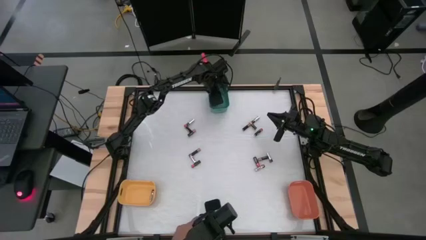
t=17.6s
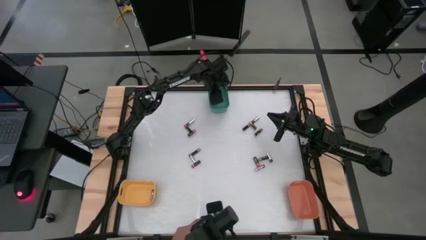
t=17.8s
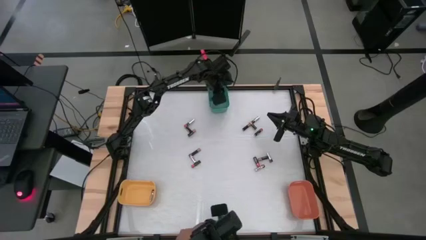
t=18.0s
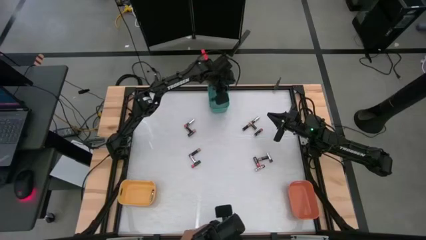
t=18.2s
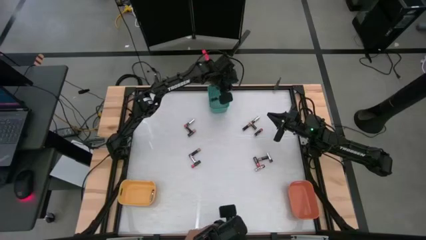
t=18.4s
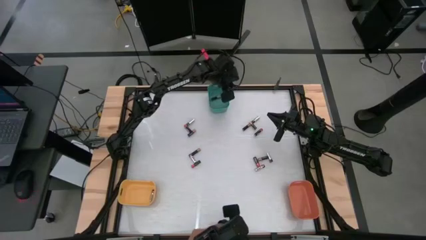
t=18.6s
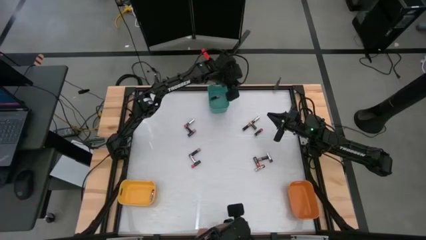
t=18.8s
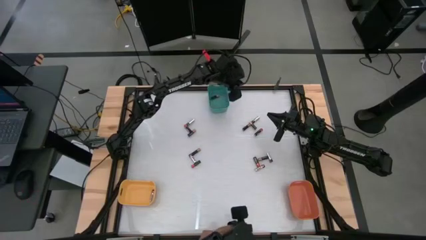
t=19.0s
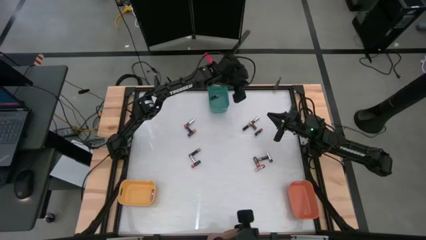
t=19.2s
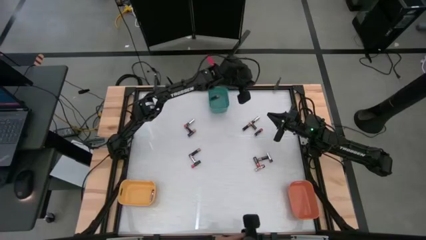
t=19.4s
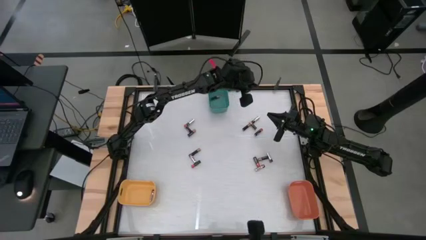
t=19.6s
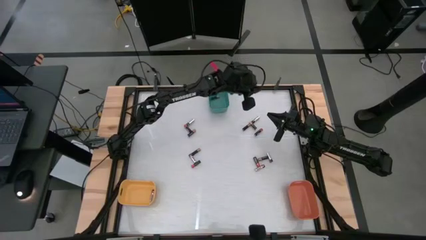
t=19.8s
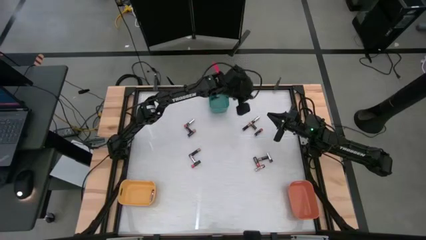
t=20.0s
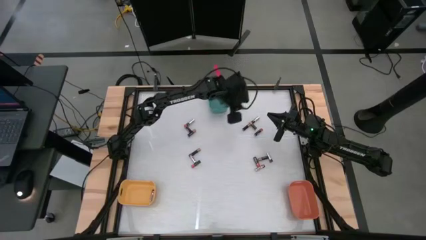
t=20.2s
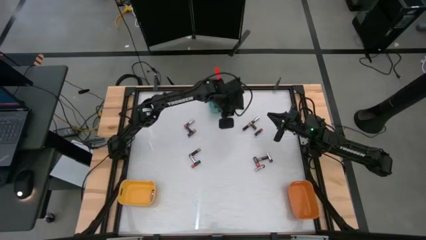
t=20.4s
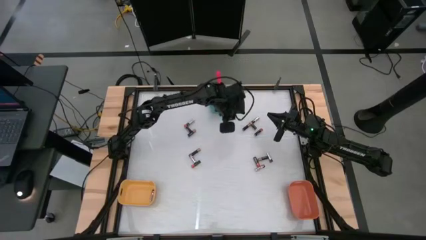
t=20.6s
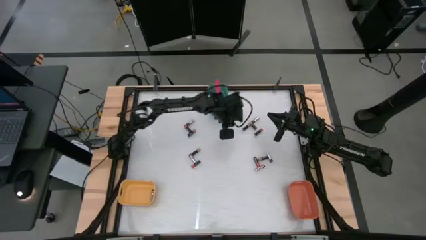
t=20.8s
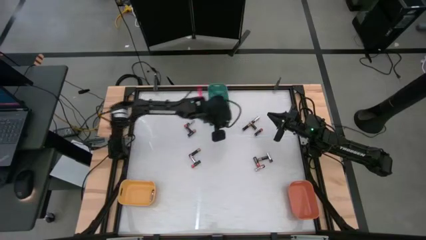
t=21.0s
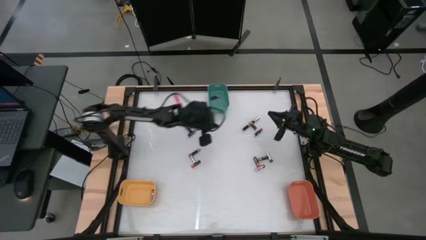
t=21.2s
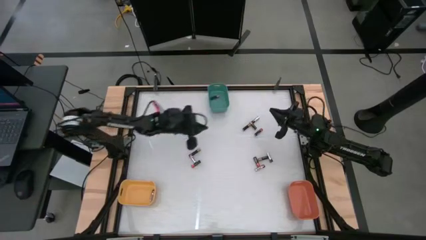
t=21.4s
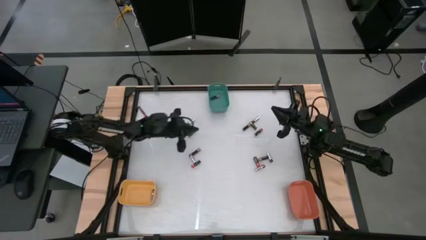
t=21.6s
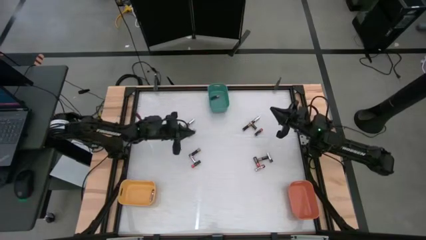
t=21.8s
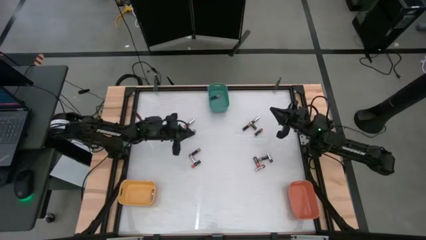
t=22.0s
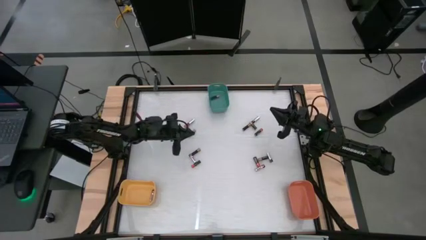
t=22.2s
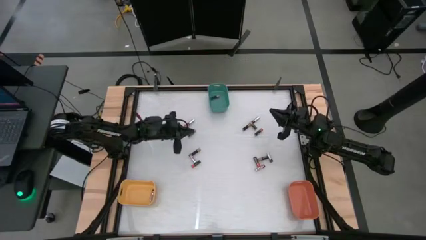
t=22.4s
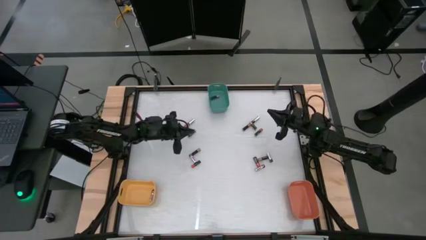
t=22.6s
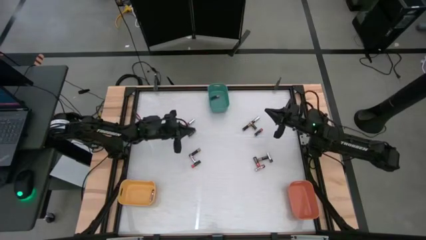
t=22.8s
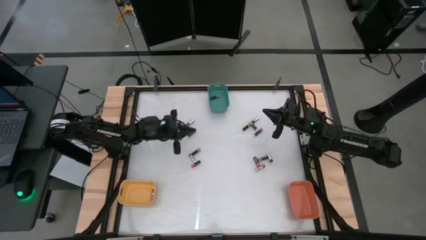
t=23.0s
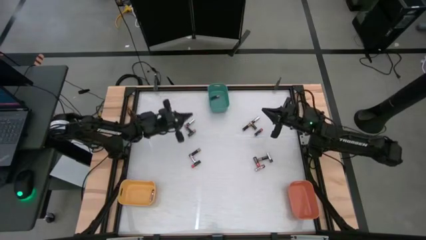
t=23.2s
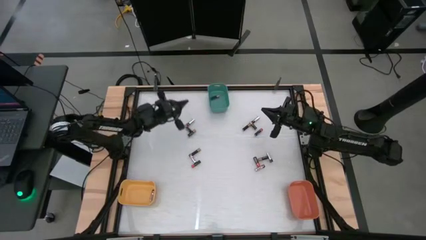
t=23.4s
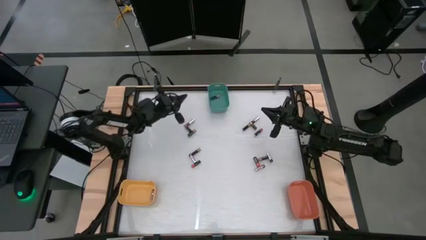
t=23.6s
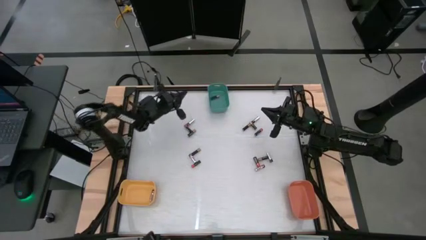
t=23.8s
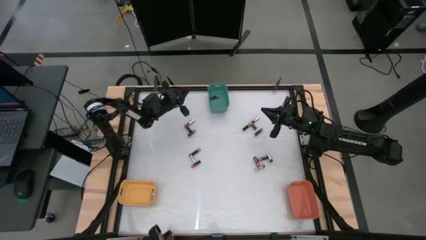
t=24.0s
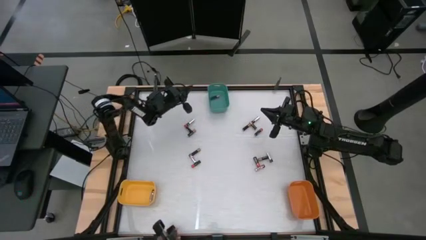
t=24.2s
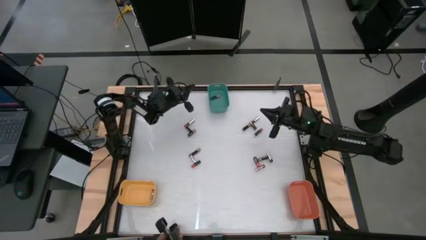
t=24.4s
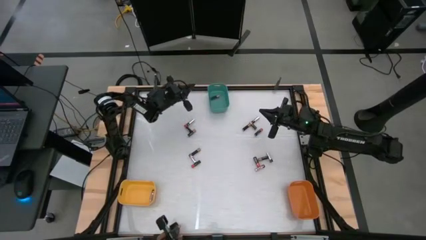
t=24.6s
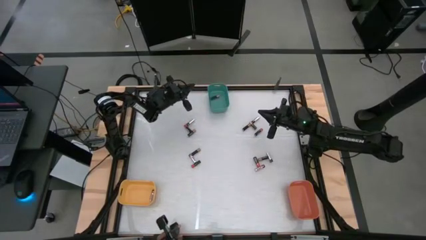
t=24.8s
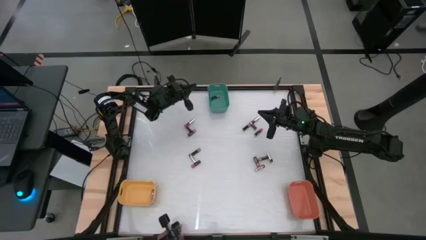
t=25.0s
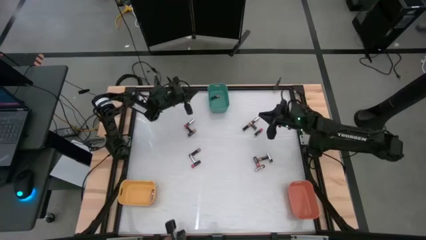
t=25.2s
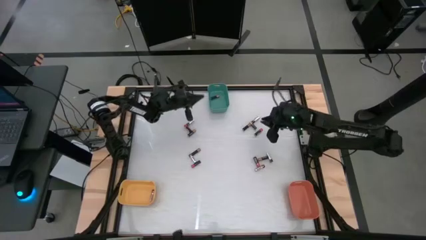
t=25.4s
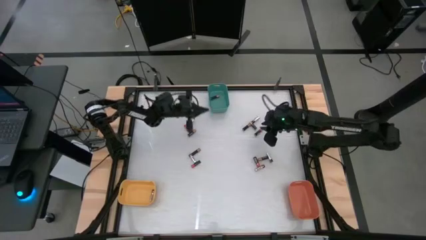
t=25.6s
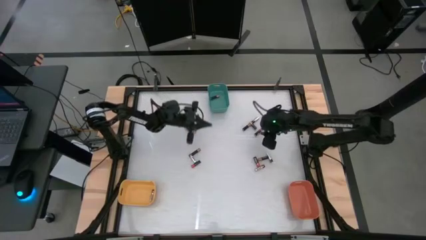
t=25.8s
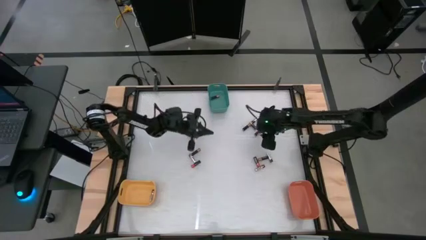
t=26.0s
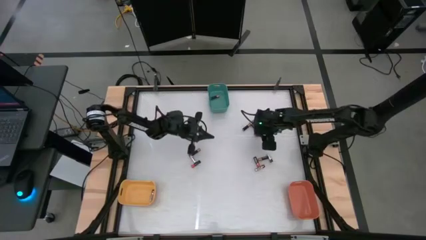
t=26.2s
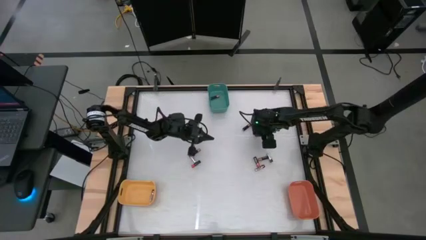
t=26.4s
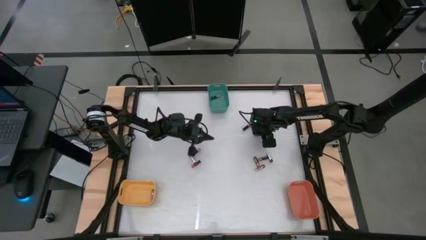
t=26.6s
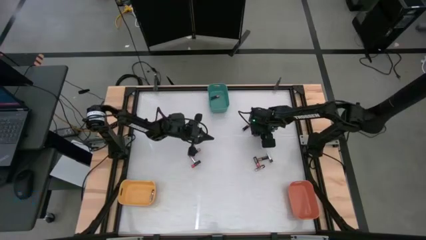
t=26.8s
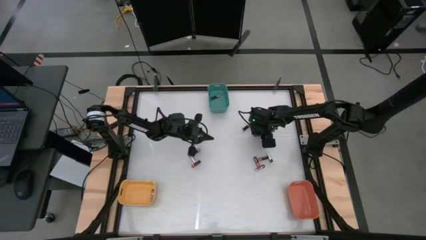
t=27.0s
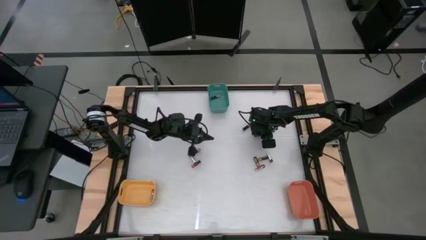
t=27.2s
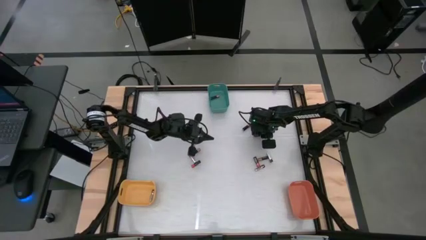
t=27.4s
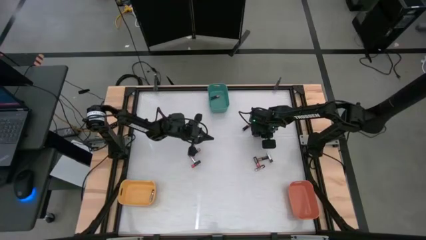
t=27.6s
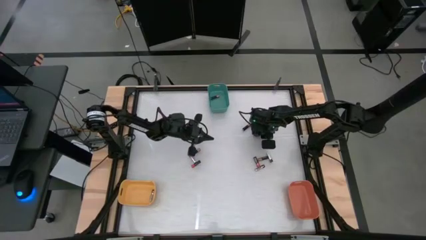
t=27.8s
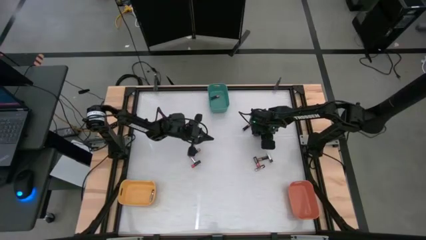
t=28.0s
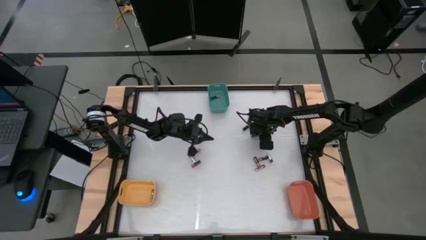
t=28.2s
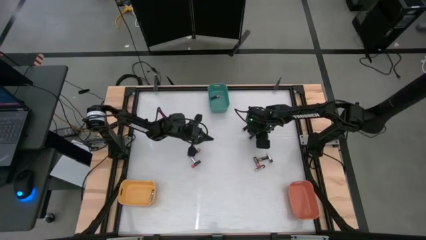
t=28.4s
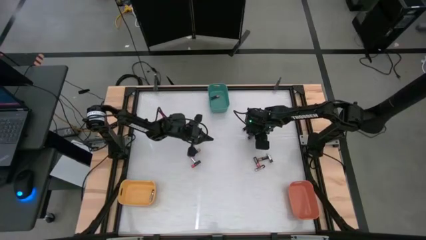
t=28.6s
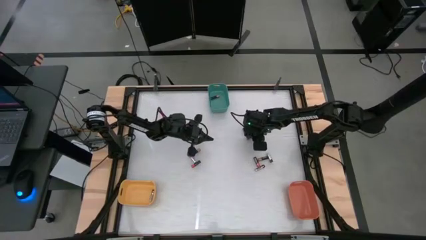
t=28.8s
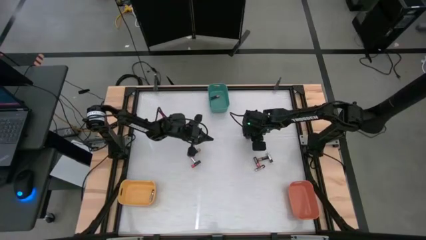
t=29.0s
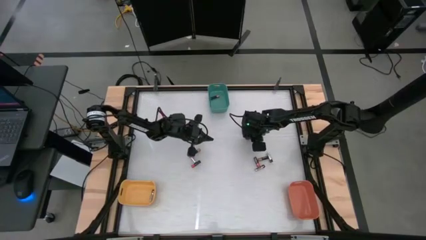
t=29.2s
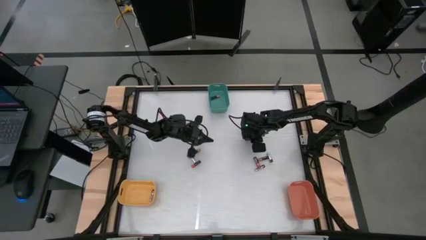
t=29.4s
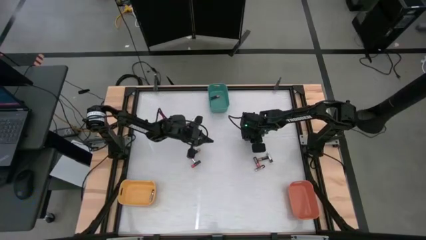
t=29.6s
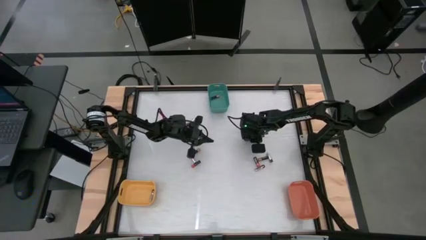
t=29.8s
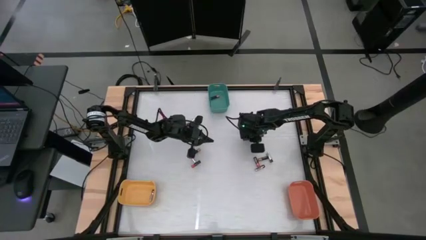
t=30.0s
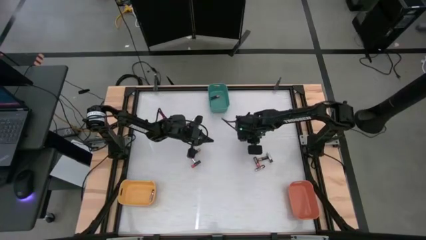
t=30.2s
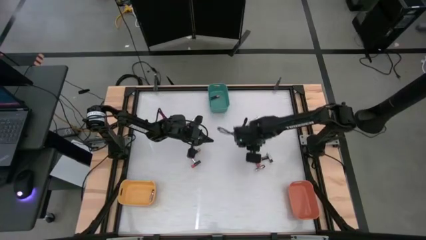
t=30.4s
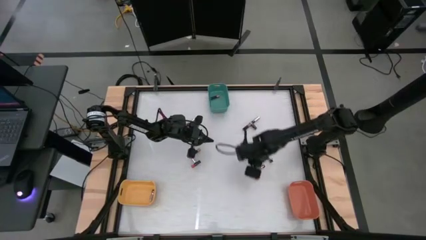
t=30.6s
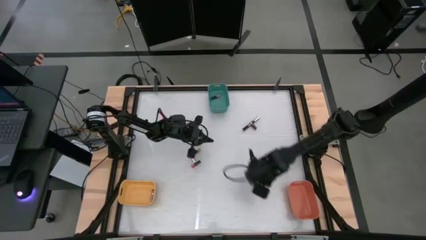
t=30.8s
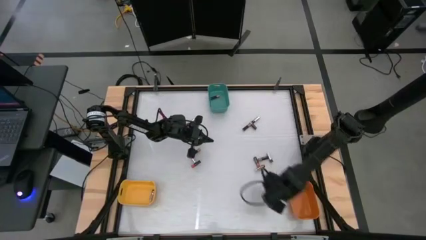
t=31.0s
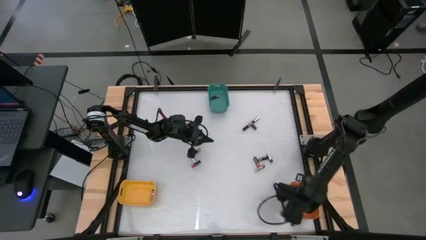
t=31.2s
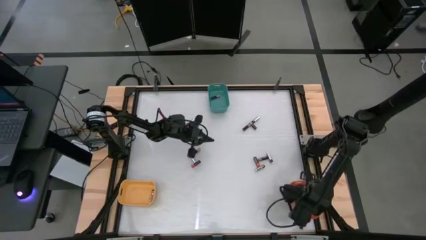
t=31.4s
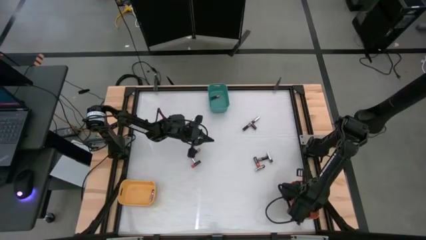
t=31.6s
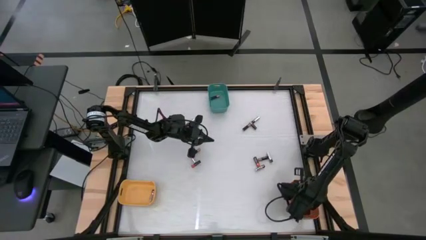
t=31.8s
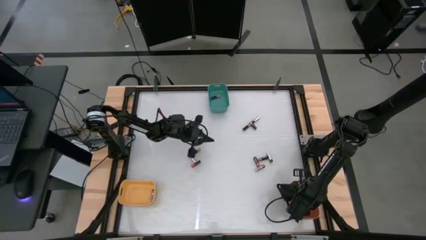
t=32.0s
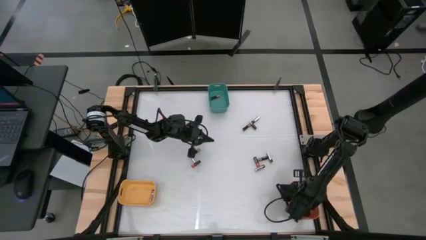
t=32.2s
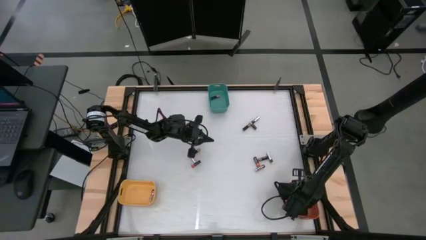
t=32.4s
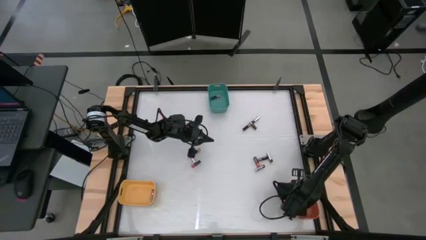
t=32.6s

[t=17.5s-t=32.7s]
Task: Sort batteries
Put the red battery into the orange bin
